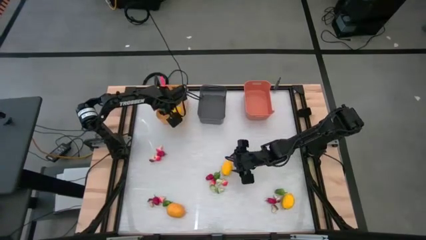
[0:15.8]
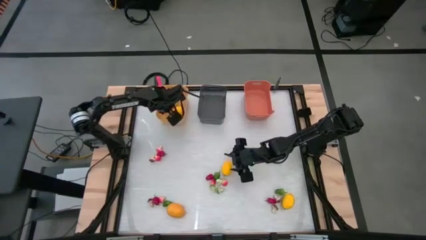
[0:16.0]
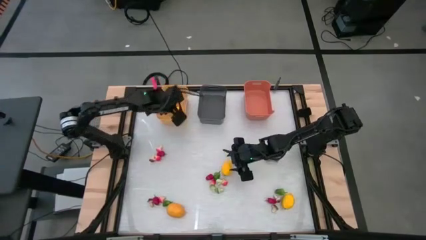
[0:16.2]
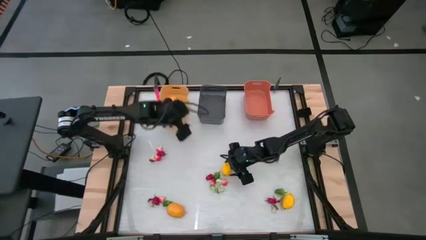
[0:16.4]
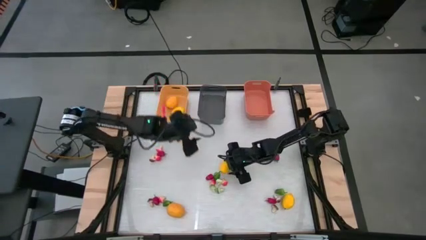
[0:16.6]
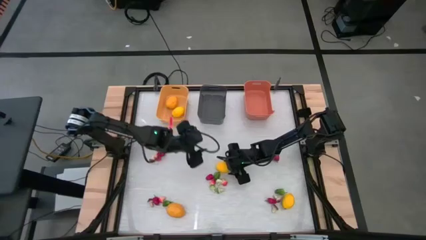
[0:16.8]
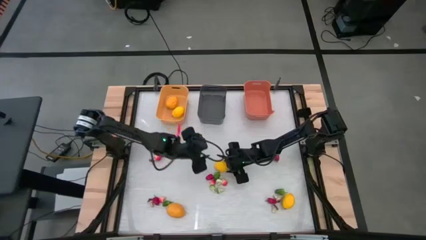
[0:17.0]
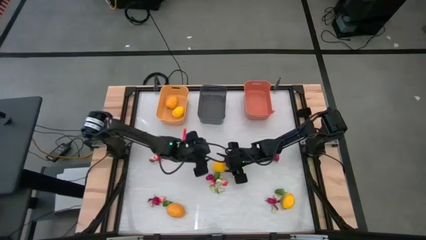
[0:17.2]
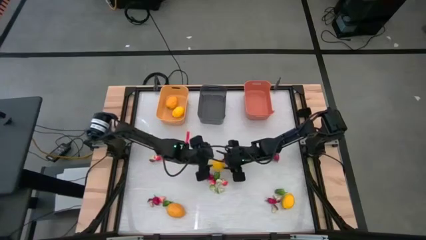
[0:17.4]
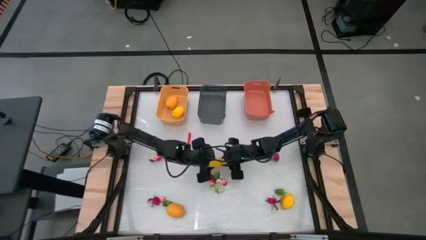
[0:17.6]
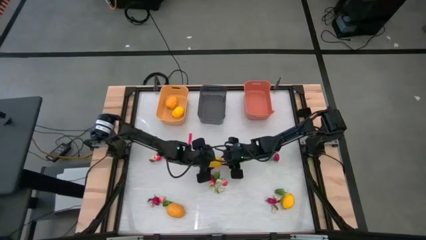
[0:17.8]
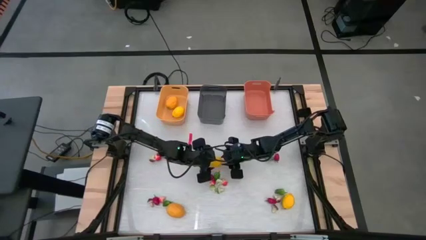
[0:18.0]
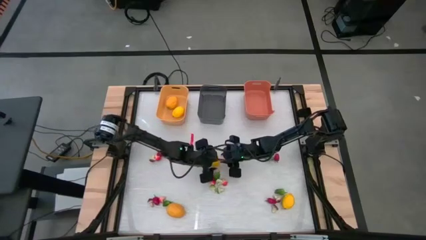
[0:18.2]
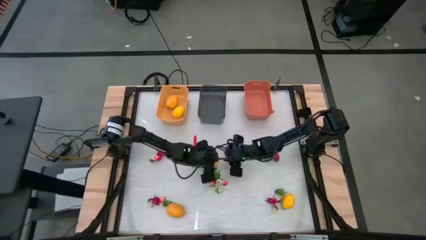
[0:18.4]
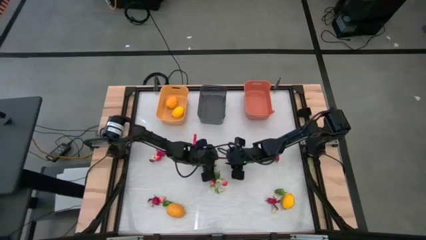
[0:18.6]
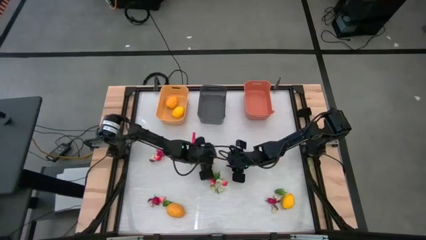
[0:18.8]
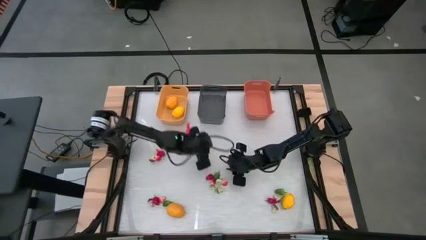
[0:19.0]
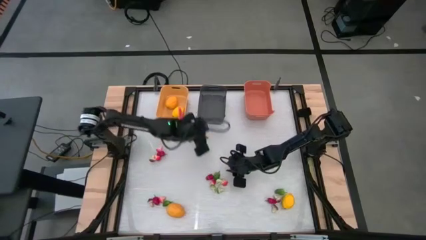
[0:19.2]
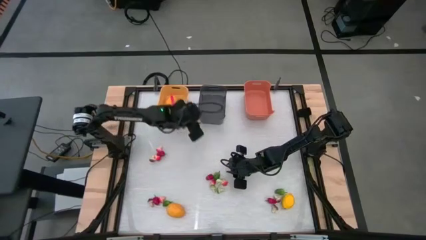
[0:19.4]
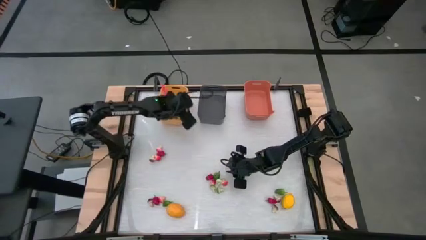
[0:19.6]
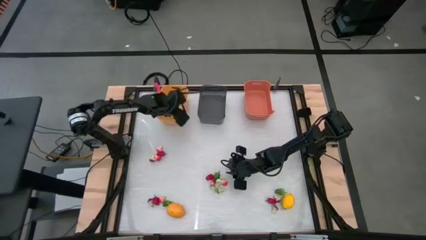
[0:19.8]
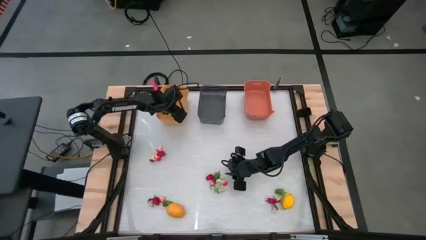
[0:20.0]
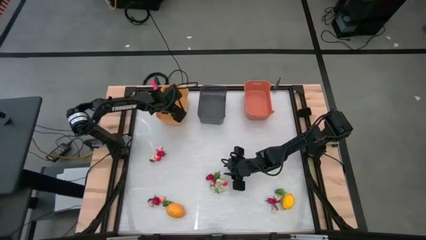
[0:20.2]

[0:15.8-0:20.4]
Task: Sort produce into baskets
Put the yellow lemon into the yellow bin

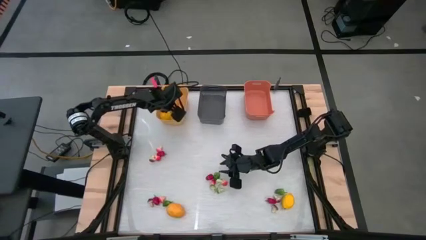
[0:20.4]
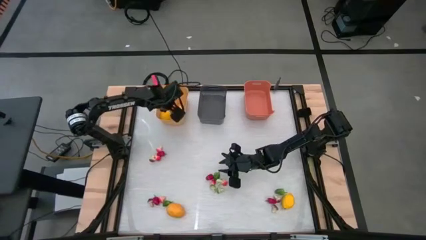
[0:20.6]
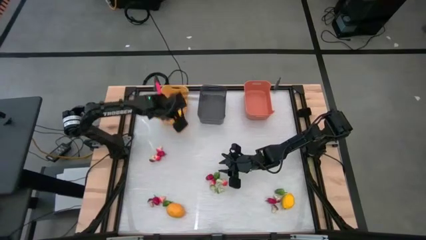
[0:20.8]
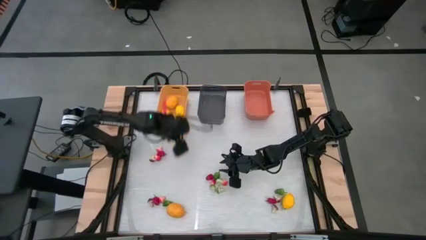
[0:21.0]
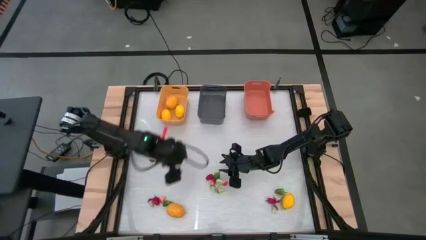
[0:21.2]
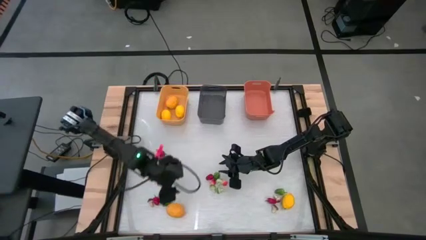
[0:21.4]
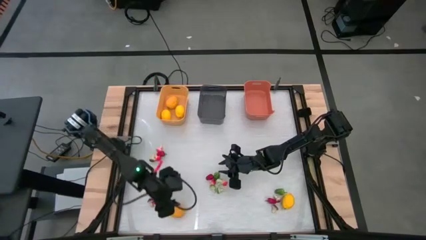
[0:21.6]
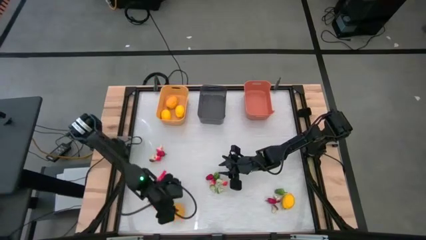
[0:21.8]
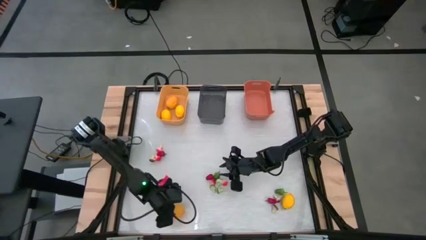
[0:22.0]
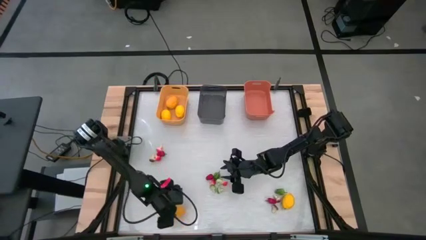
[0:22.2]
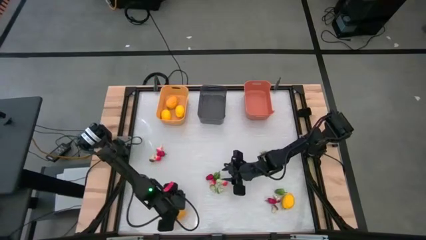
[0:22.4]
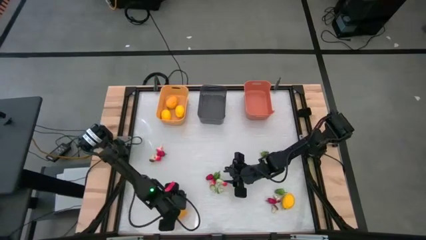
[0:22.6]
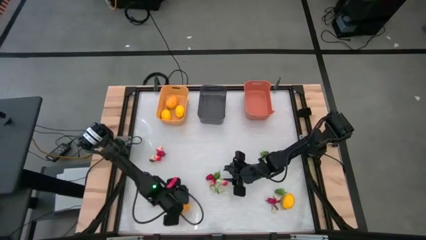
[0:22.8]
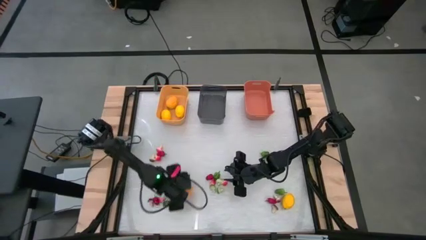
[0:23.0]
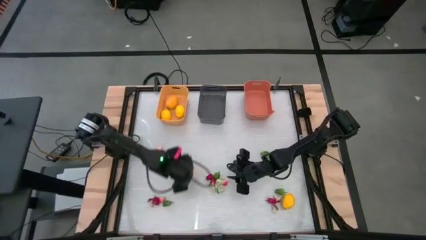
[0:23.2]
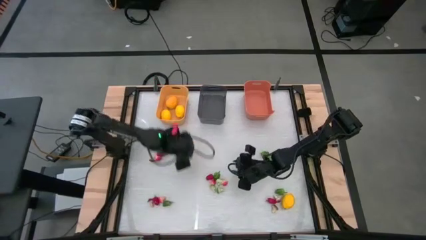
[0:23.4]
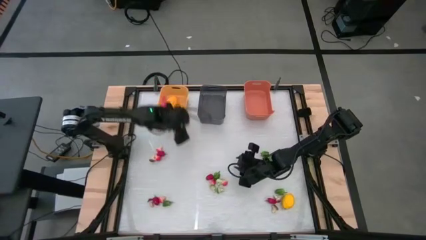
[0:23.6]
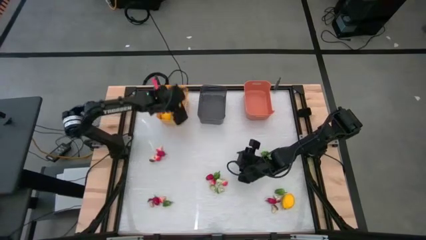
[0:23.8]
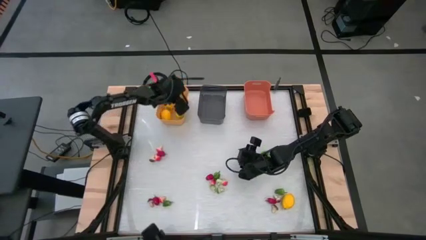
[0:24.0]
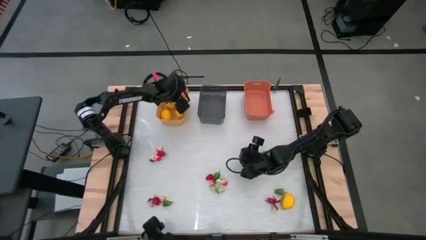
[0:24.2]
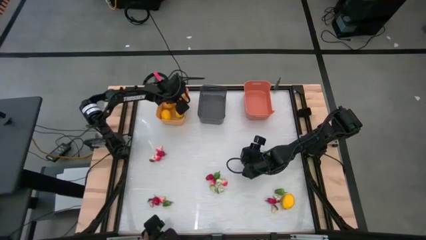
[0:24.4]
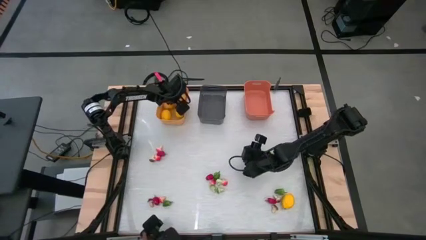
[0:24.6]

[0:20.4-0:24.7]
Put the yellow lemon into the yellow bin

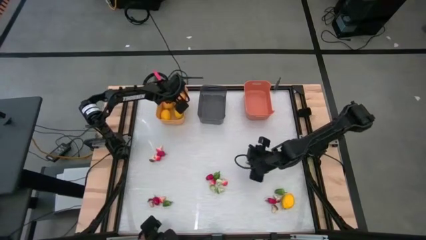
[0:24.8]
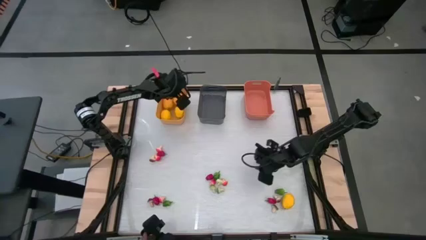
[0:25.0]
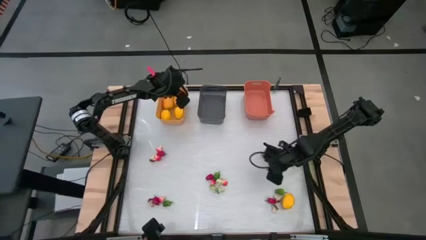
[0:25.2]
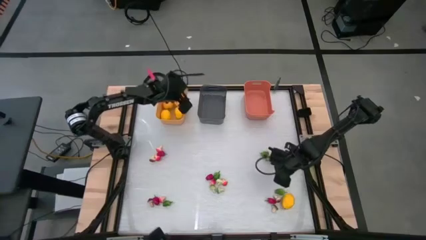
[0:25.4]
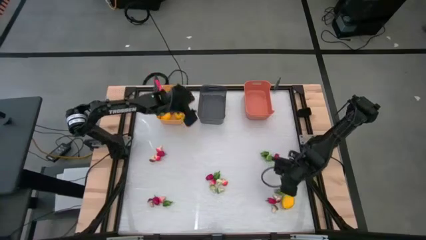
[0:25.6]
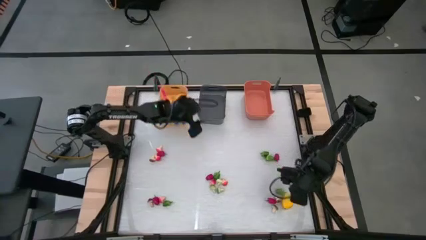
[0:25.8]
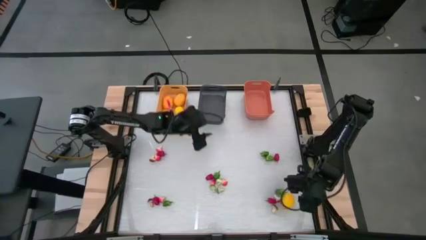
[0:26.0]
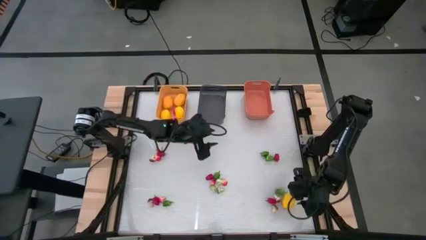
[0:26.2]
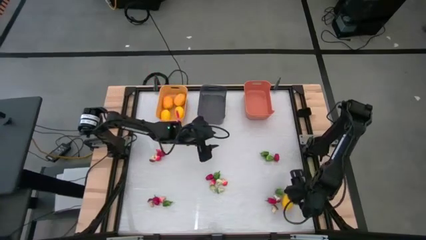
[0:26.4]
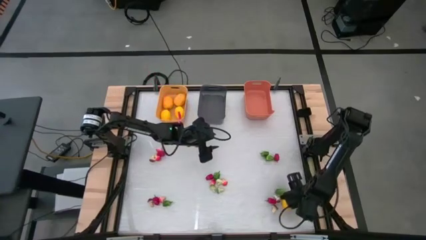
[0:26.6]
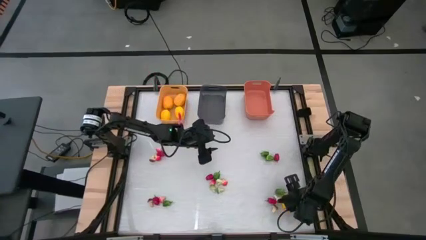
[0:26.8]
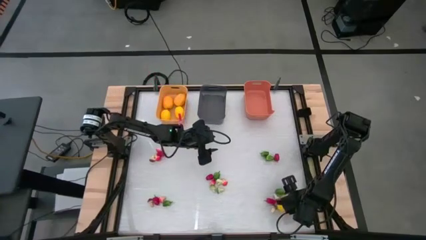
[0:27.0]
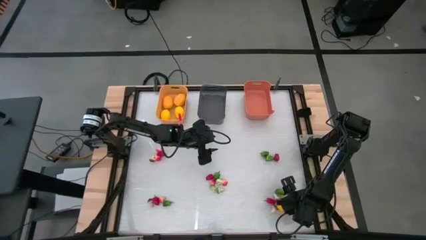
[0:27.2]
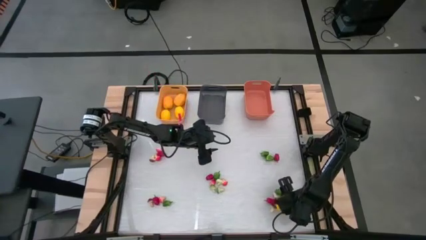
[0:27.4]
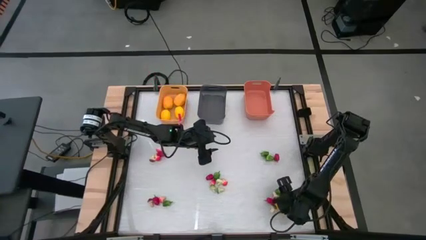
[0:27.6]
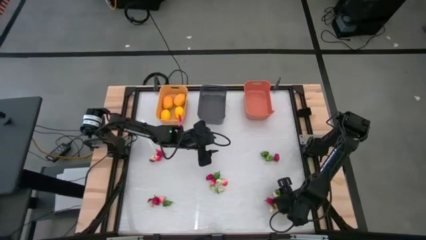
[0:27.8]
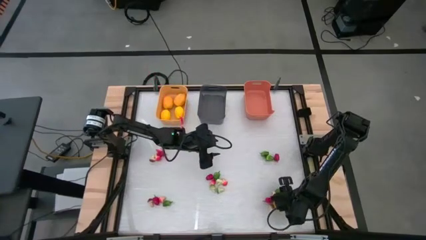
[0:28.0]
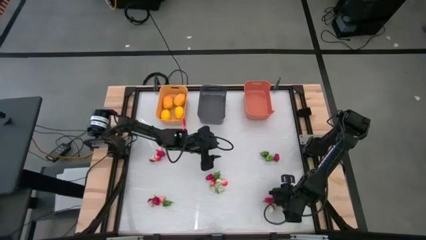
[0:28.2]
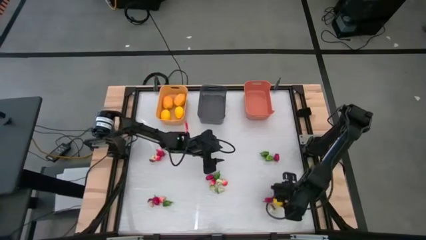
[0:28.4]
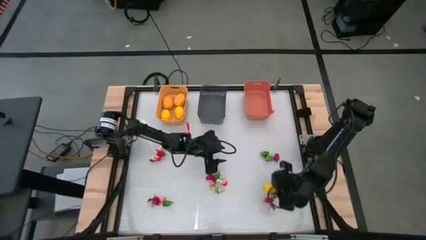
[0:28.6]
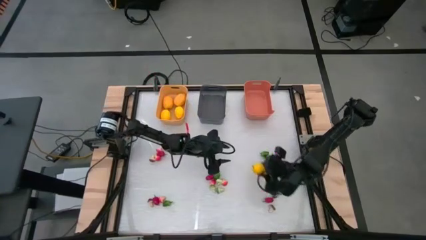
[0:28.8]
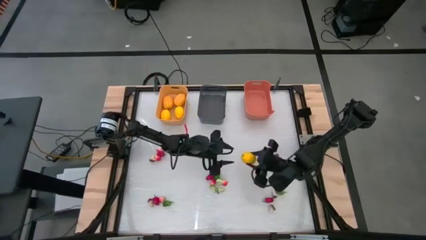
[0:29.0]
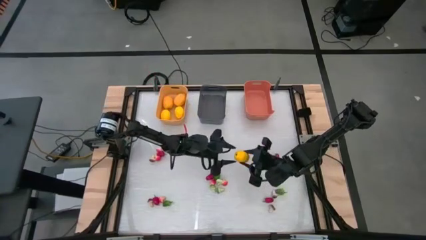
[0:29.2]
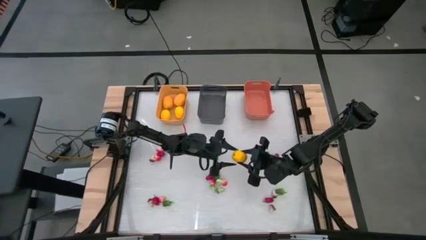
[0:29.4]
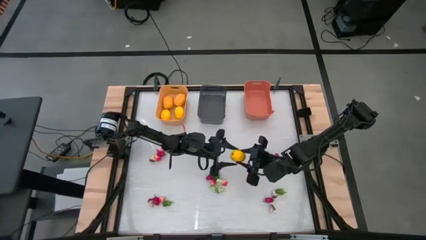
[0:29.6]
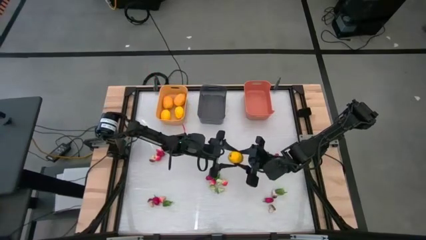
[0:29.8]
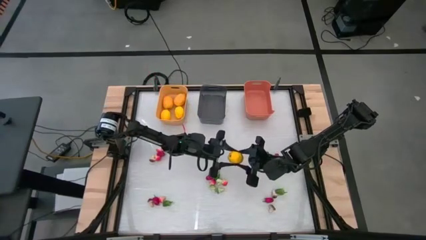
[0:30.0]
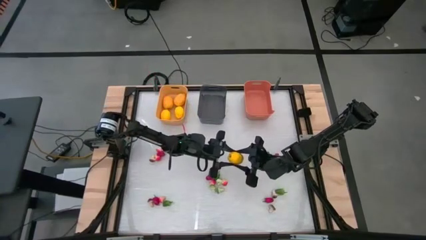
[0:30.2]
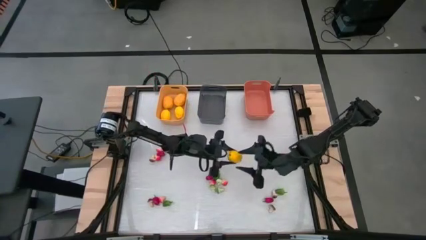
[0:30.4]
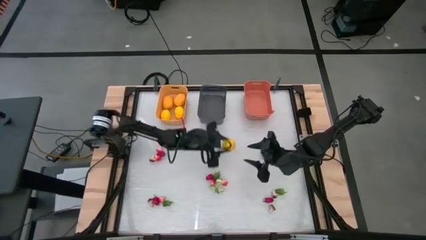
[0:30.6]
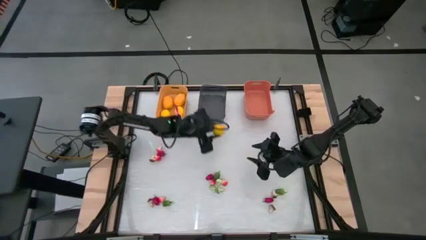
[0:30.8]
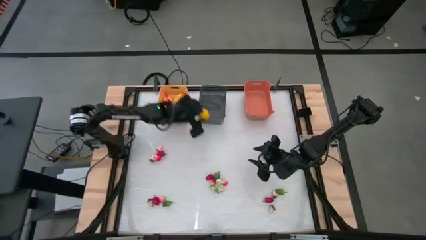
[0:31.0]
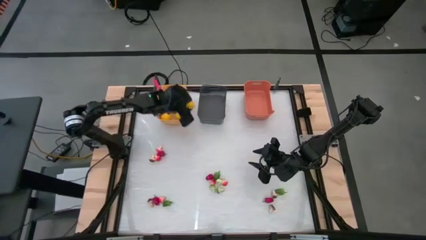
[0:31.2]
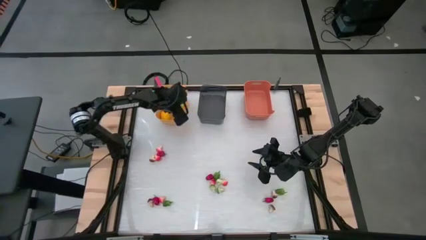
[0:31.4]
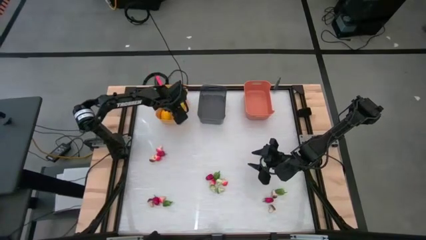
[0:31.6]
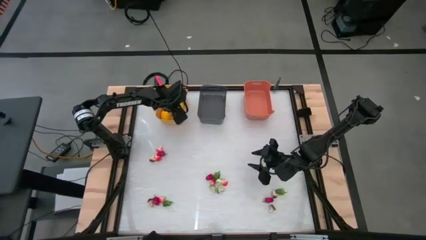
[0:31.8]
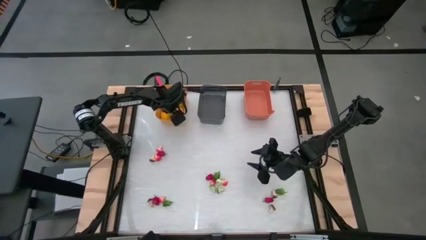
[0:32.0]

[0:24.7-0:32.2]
Put the yellow lemon into the yellow bin
